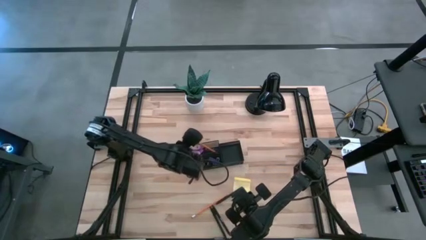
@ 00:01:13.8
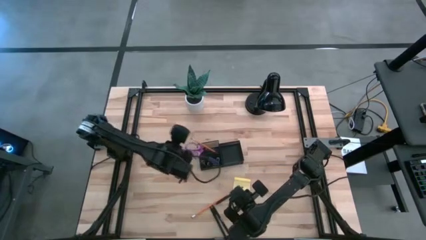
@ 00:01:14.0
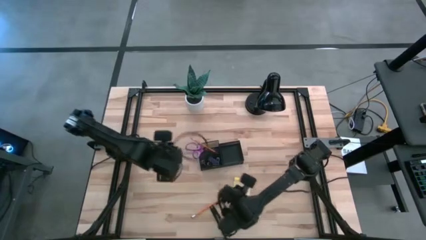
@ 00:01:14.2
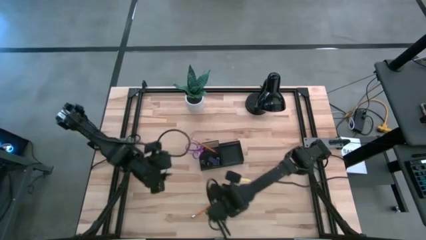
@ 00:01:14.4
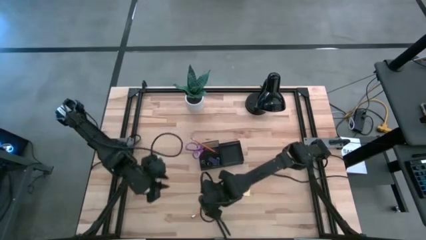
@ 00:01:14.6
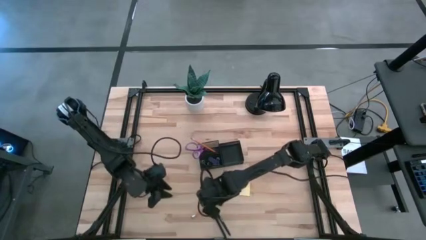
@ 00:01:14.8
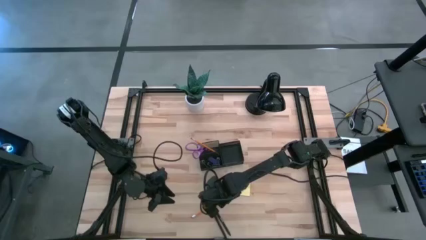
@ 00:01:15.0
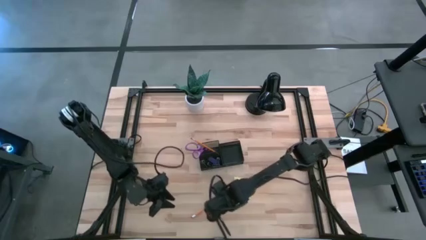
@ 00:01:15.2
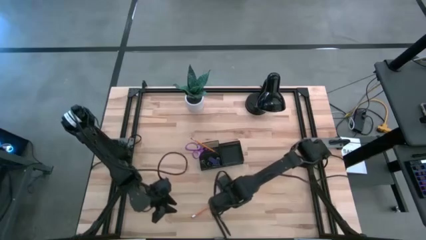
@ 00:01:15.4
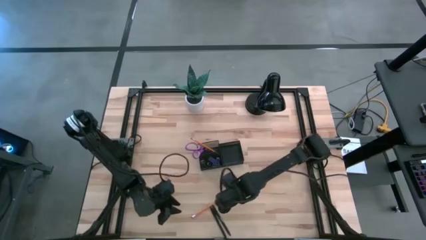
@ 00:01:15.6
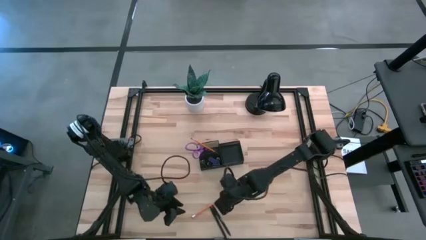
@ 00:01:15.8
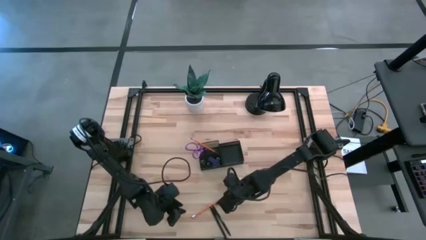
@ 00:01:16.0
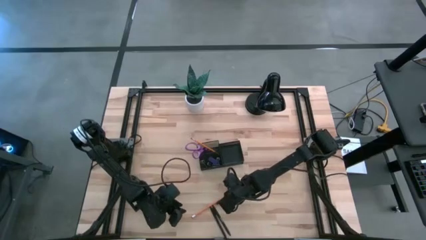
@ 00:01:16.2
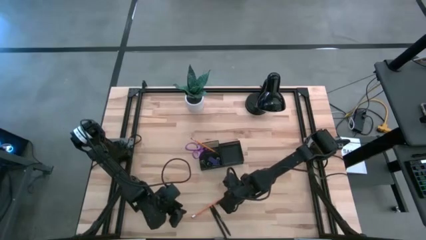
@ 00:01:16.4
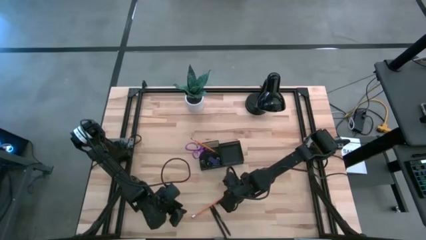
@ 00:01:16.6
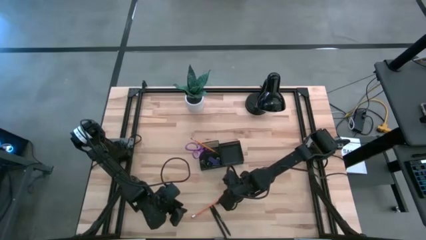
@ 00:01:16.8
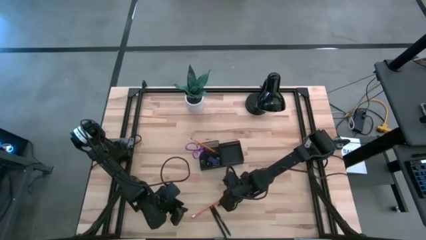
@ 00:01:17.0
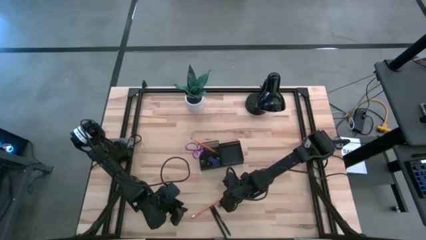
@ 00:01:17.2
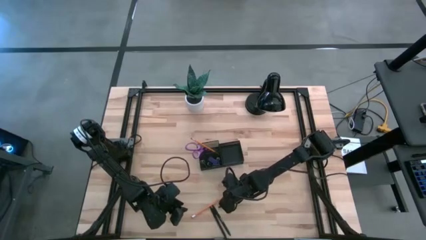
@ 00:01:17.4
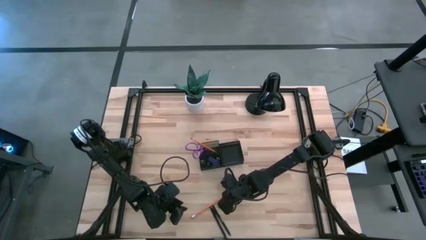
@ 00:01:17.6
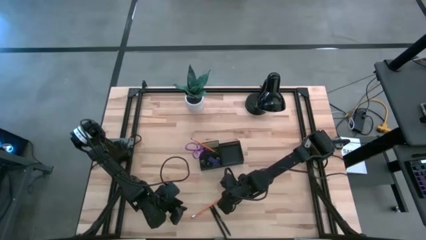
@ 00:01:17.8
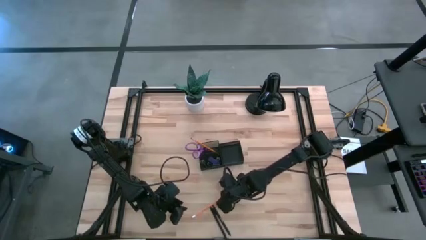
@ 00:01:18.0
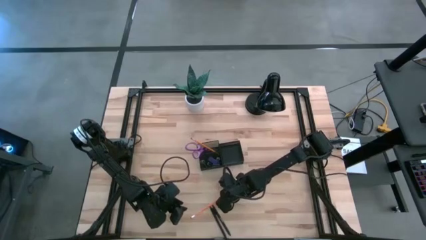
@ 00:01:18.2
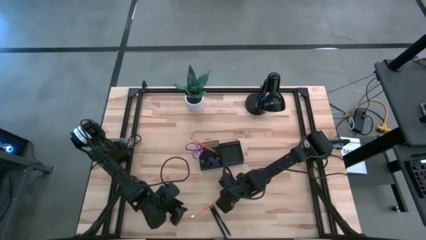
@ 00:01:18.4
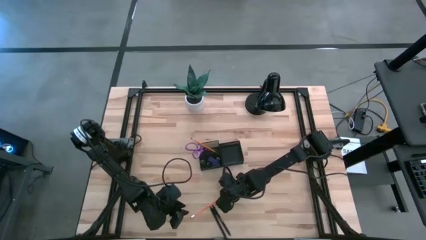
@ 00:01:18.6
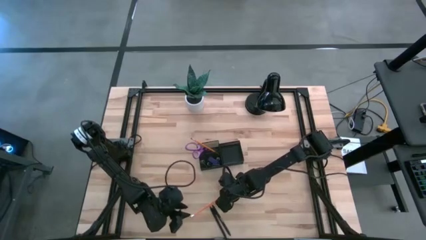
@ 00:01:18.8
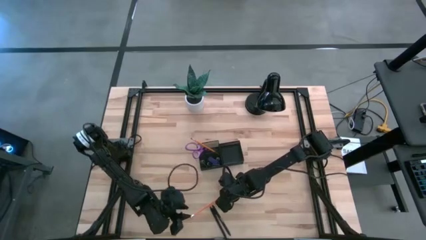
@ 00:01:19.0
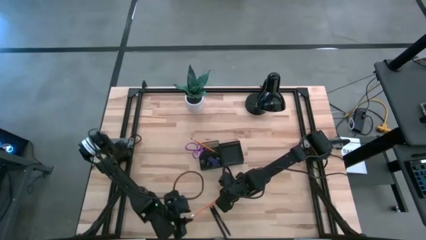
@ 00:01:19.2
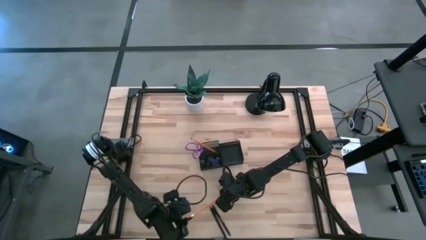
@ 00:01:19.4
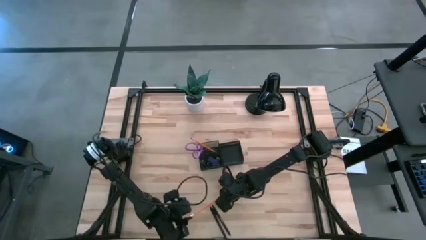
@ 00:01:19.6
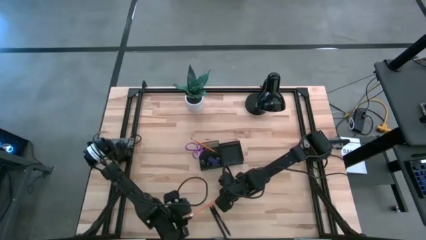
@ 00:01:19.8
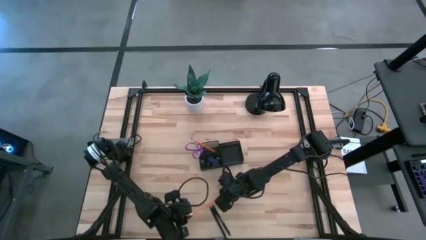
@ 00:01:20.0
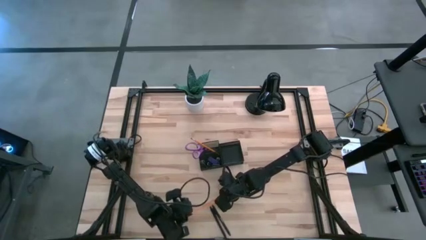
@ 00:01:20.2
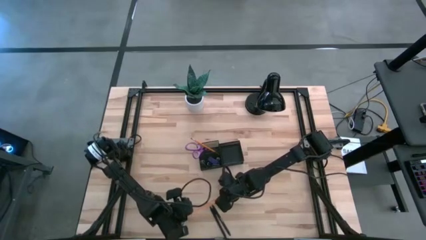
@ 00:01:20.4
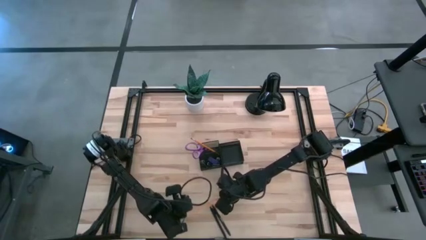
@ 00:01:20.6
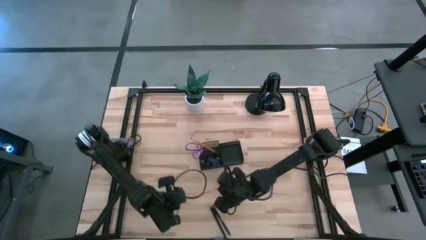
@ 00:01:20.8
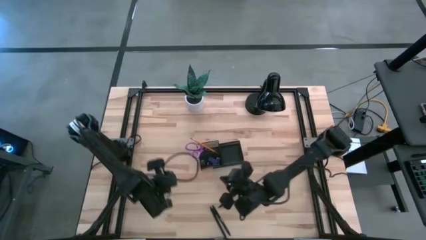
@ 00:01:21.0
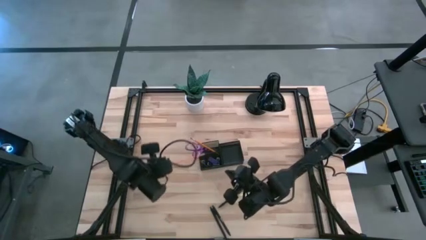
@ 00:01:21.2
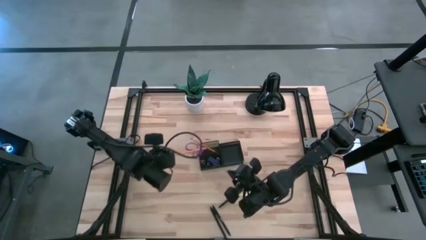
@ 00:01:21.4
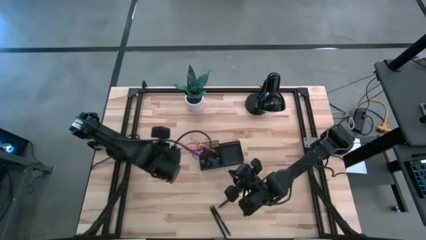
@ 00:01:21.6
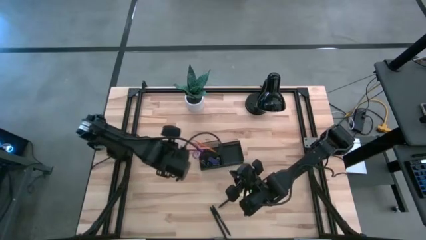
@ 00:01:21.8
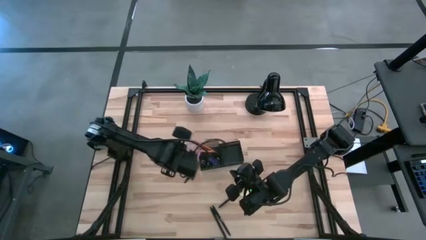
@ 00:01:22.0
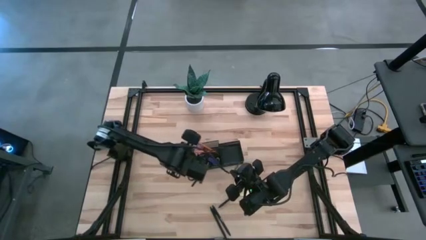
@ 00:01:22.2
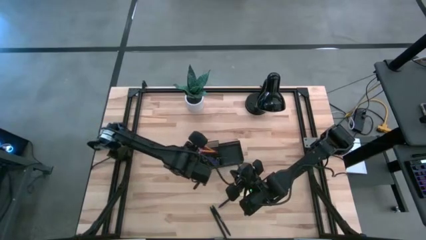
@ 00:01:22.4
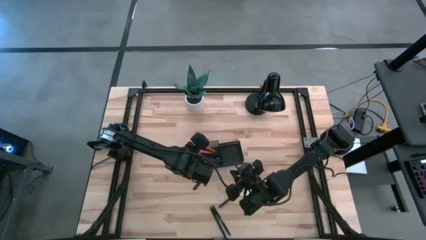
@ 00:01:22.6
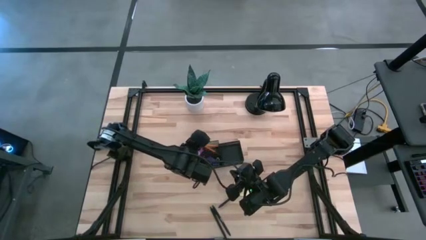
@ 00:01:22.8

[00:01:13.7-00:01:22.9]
Task: Pick and place office supplies into organizer
Put the pencil into the desk organizer

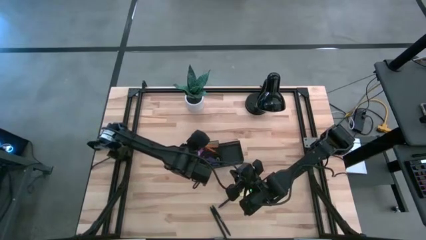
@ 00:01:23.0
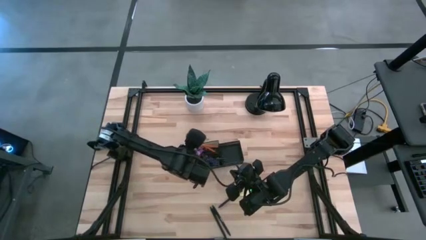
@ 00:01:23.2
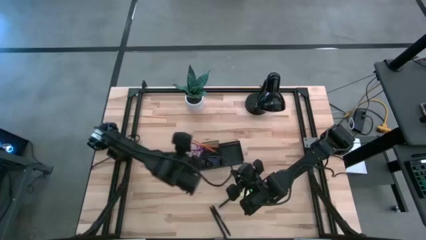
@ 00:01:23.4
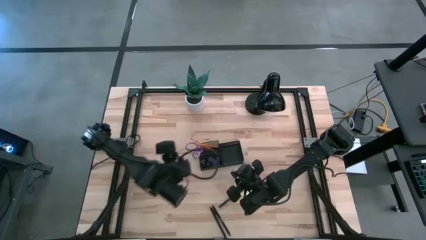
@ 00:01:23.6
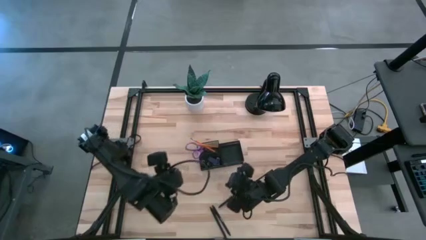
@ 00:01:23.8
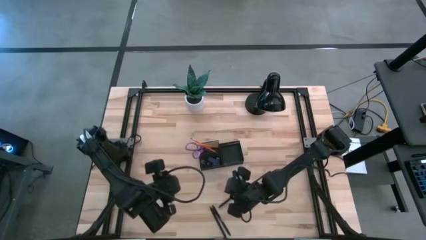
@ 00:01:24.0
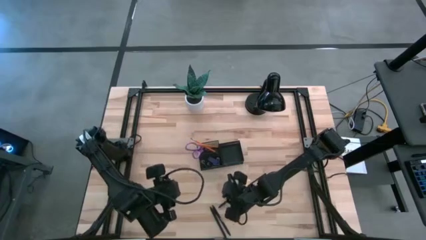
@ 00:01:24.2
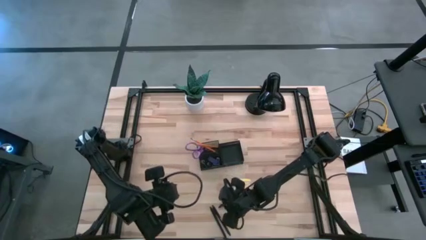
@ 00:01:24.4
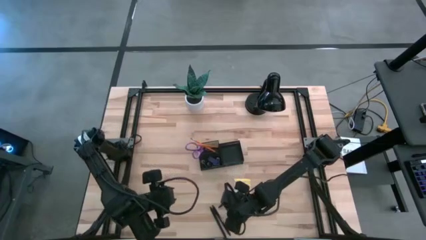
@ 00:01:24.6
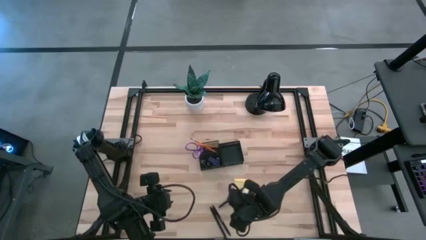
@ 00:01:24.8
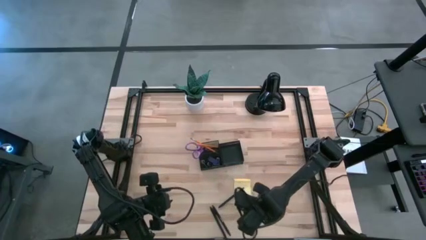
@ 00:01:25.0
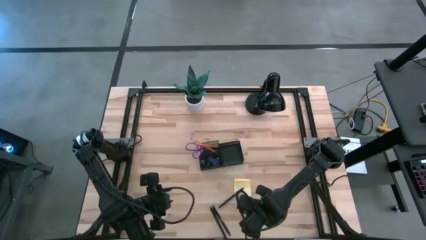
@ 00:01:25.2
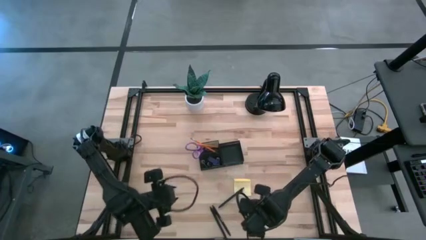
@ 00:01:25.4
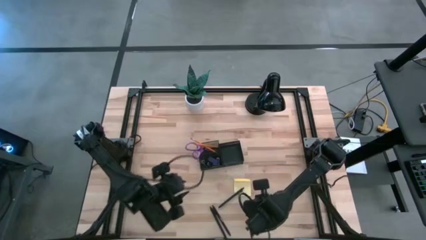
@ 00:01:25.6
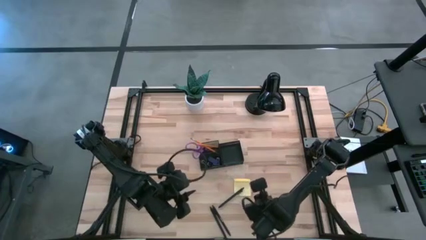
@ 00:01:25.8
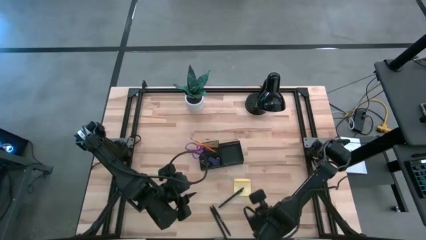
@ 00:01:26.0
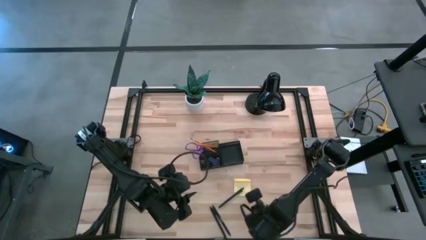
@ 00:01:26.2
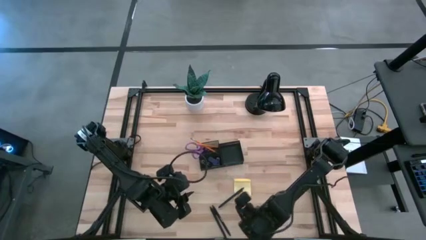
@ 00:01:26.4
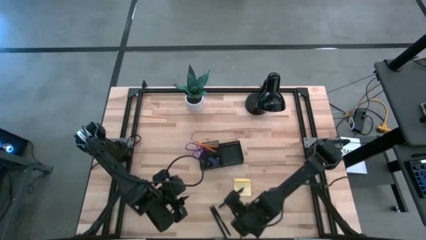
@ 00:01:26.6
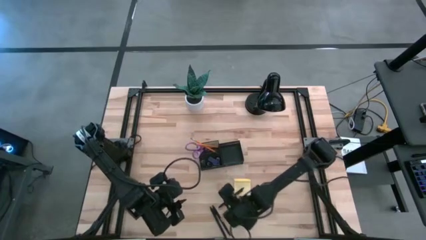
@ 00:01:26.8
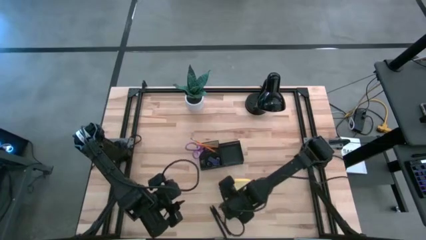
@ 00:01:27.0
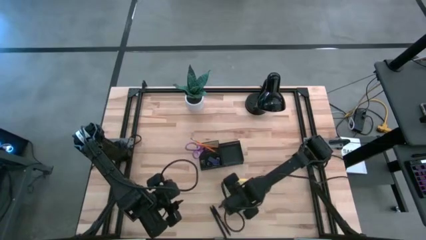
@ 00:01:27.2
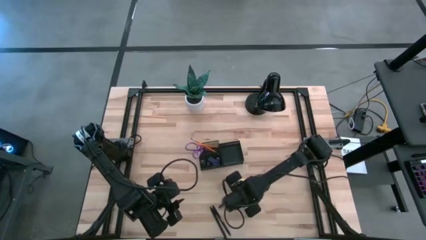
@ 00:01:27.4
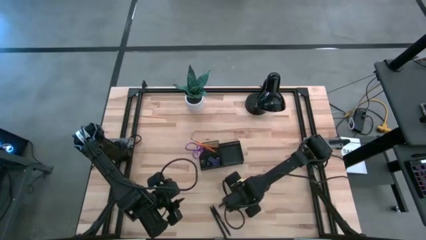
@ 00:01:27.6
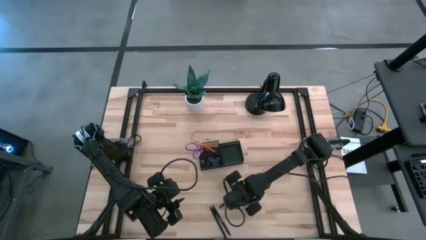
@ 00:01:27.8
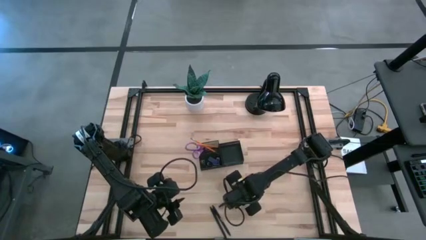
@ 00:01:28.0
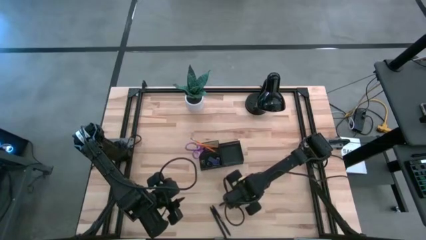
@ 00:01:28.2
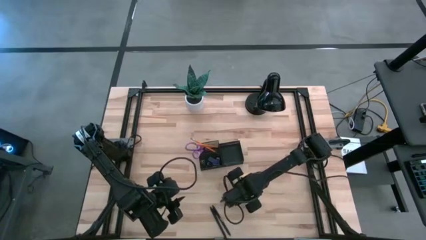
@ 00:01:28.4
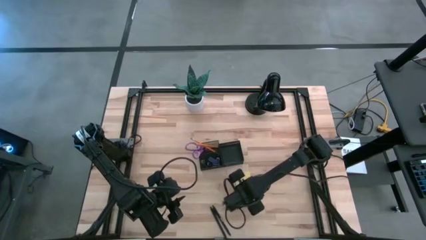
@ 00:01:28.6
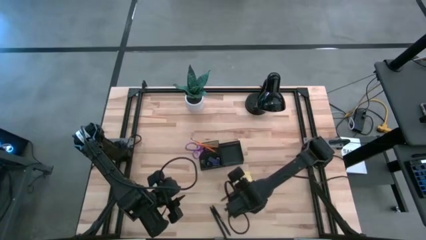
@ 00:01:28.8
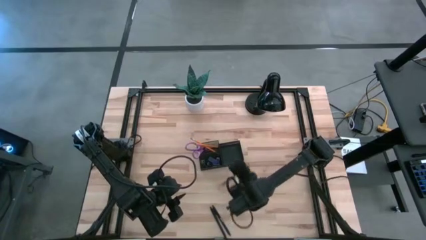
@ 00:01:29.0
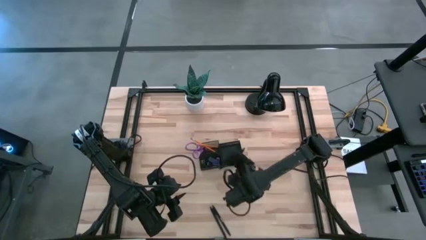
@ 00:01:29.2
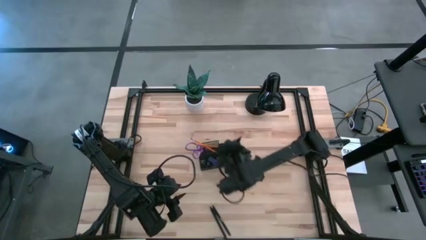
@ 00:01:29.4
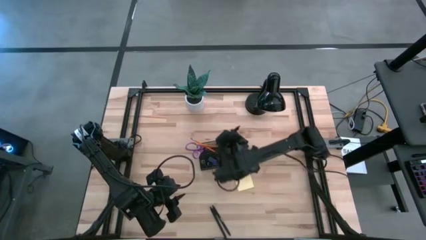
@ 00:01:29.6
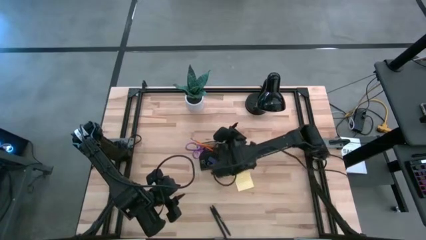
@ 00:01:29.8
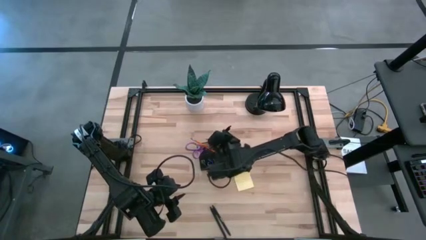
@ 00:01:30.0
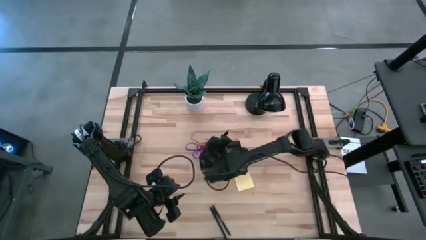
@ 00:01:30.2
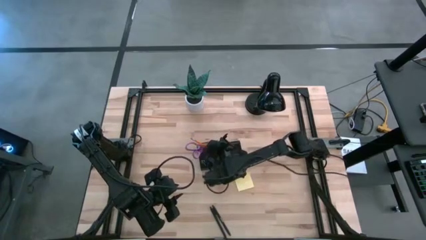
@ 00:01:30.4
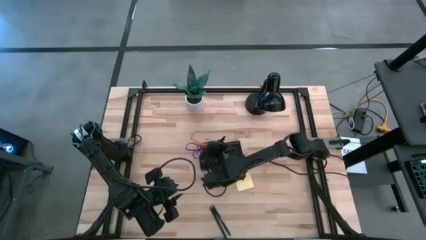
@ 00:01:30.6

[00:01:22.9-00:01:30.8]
Put the right pen into the desk organizer
